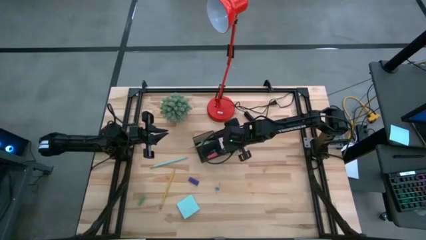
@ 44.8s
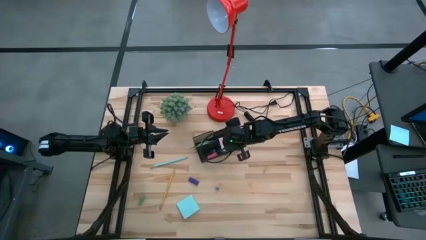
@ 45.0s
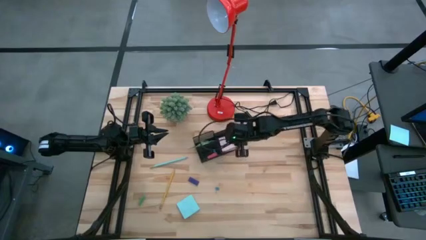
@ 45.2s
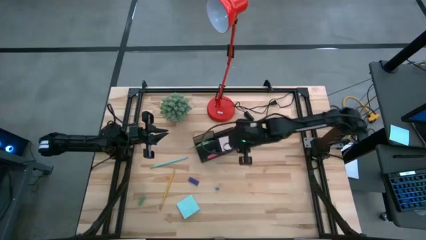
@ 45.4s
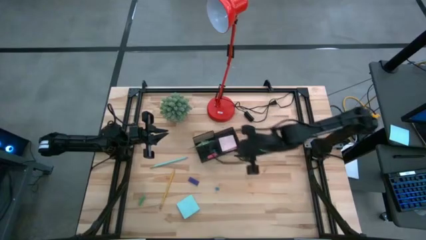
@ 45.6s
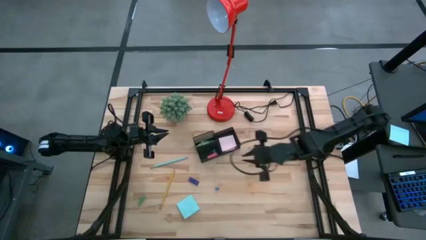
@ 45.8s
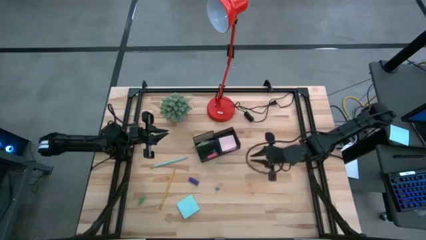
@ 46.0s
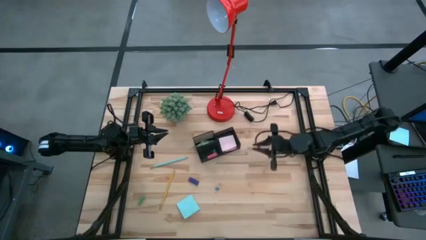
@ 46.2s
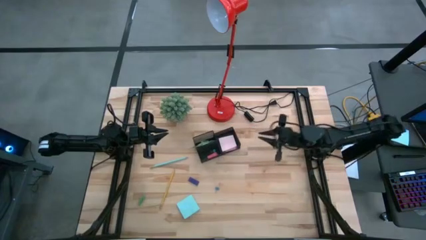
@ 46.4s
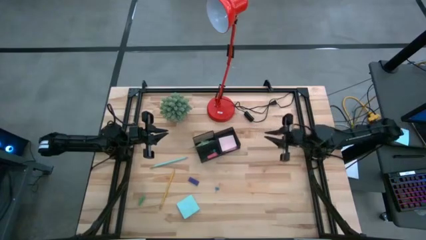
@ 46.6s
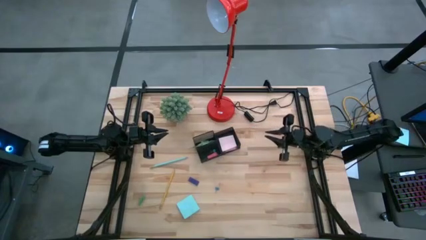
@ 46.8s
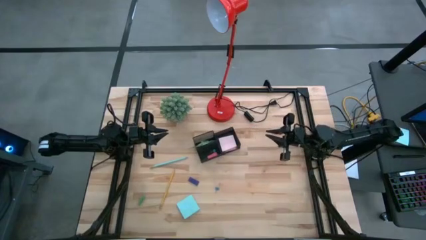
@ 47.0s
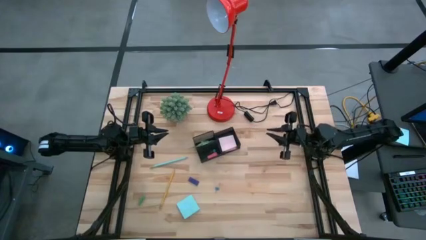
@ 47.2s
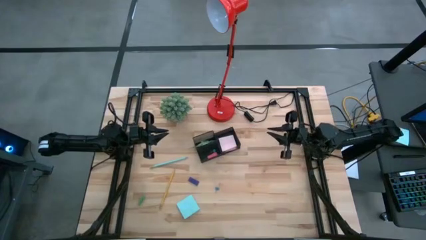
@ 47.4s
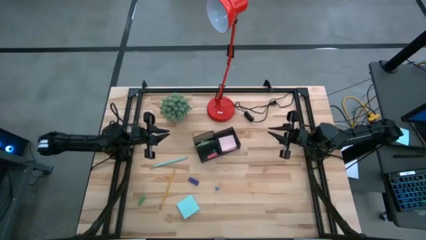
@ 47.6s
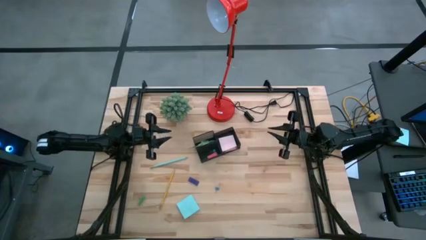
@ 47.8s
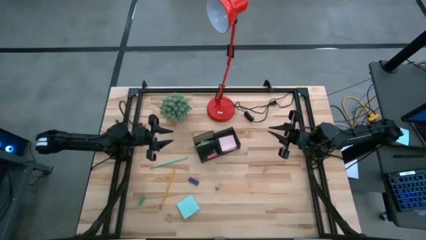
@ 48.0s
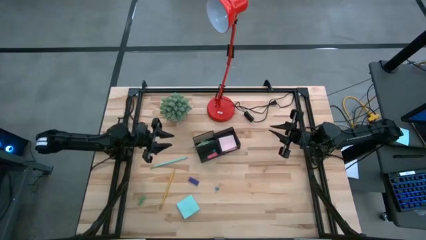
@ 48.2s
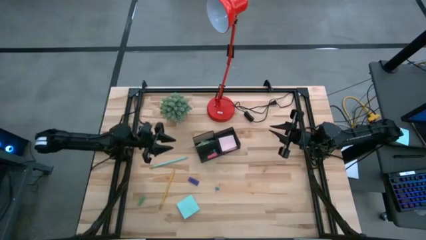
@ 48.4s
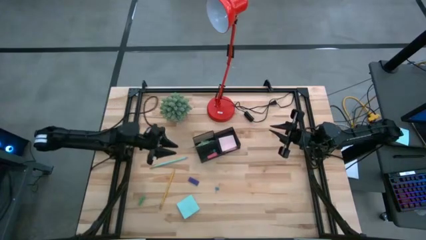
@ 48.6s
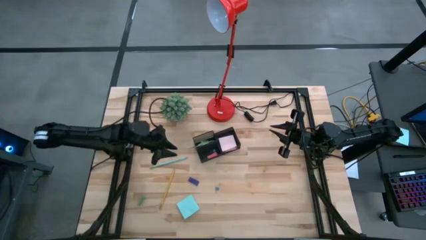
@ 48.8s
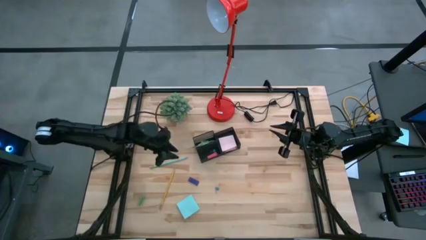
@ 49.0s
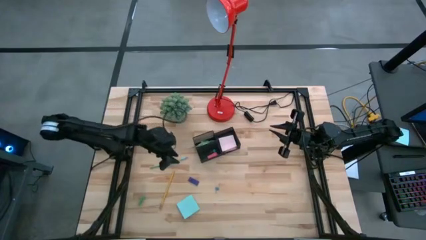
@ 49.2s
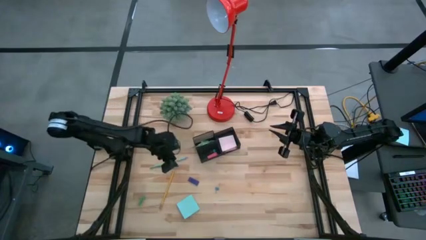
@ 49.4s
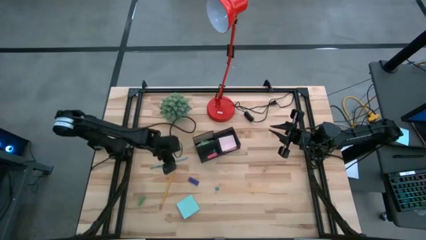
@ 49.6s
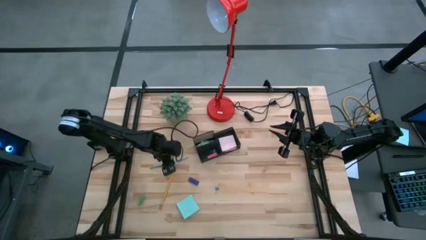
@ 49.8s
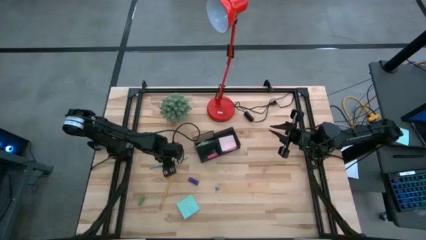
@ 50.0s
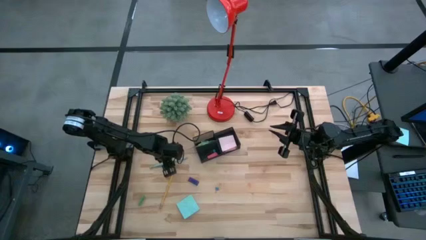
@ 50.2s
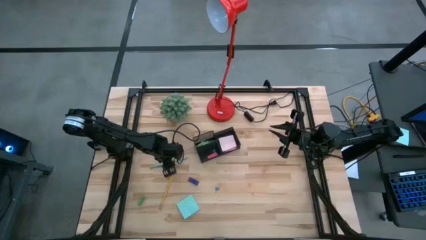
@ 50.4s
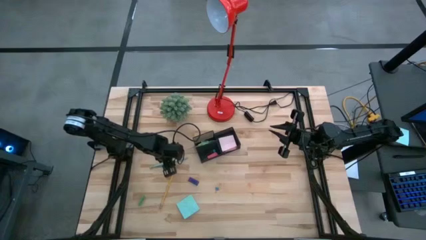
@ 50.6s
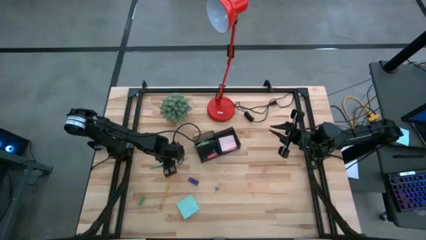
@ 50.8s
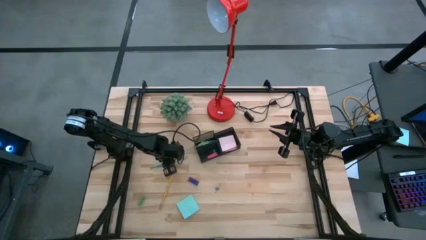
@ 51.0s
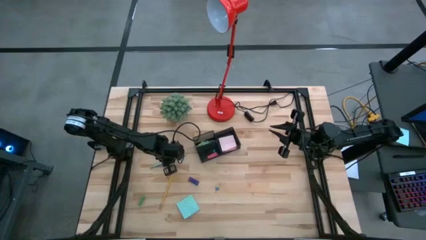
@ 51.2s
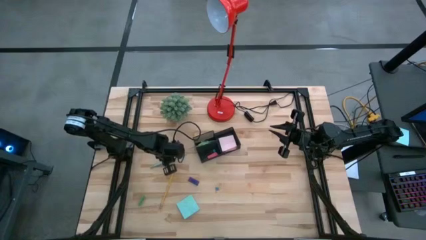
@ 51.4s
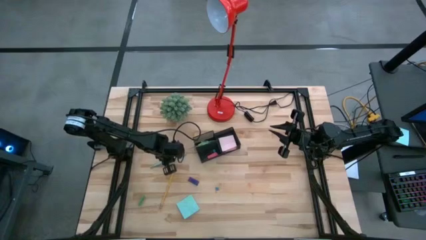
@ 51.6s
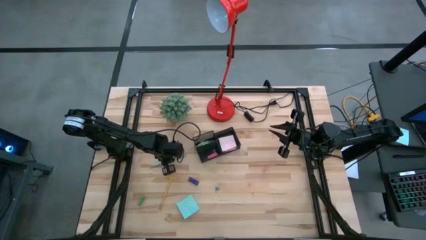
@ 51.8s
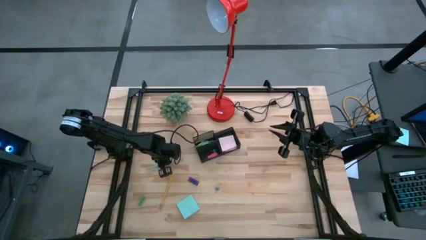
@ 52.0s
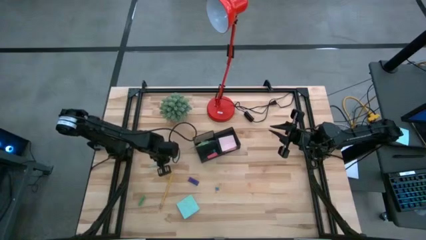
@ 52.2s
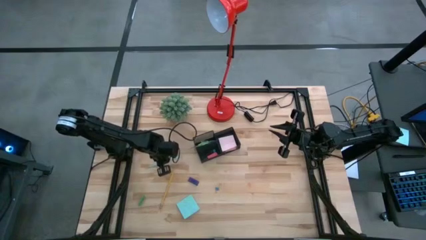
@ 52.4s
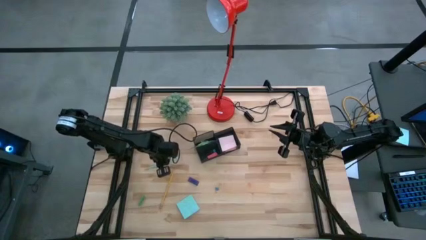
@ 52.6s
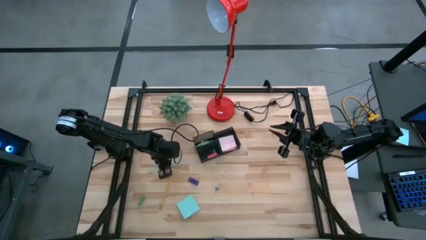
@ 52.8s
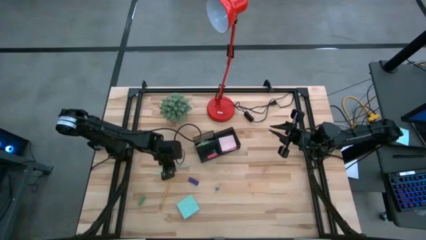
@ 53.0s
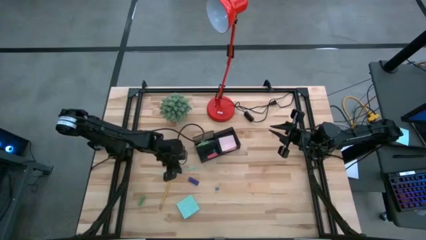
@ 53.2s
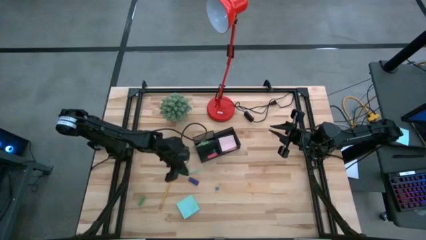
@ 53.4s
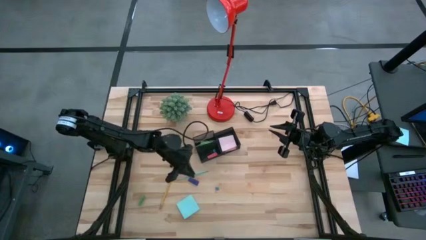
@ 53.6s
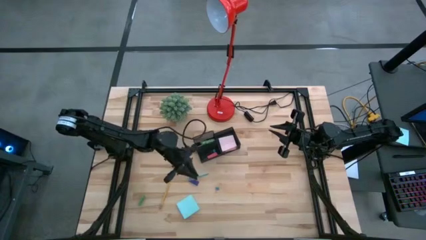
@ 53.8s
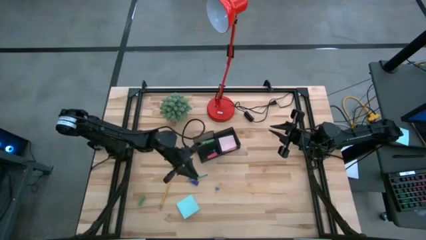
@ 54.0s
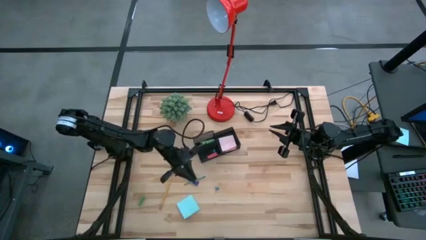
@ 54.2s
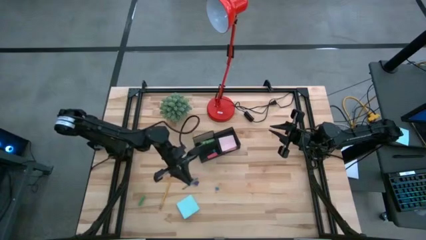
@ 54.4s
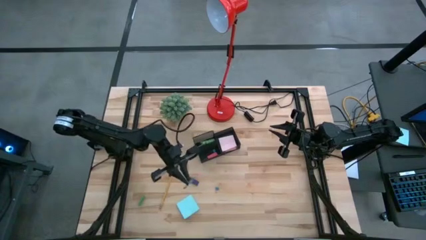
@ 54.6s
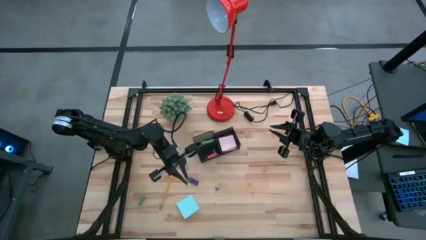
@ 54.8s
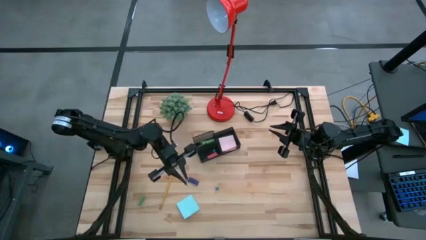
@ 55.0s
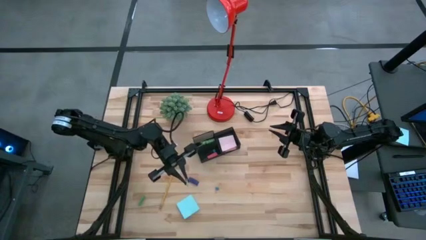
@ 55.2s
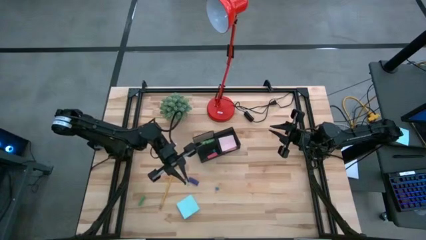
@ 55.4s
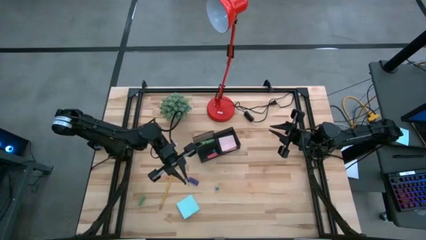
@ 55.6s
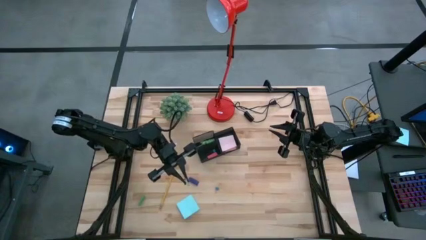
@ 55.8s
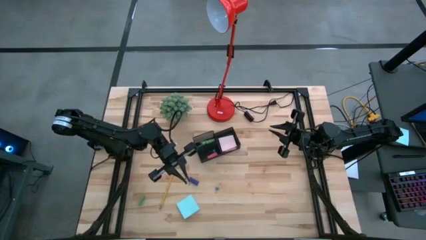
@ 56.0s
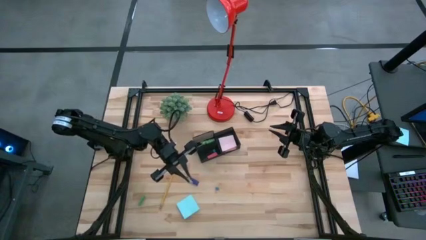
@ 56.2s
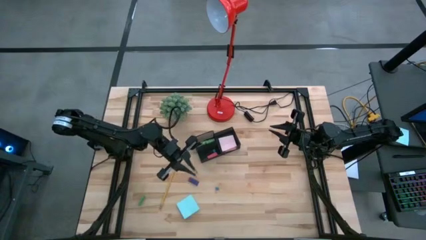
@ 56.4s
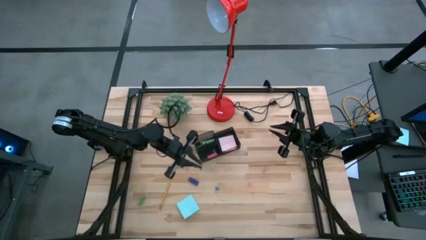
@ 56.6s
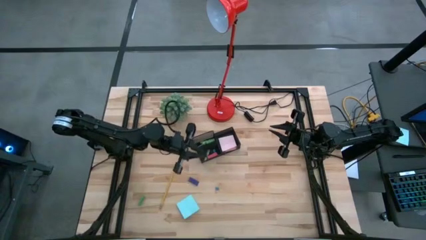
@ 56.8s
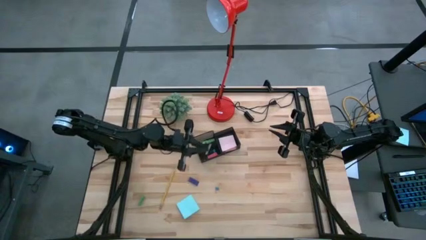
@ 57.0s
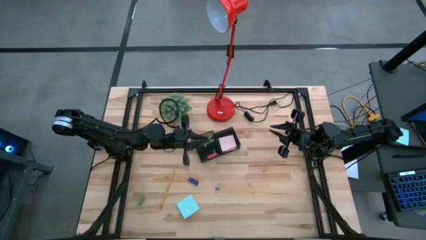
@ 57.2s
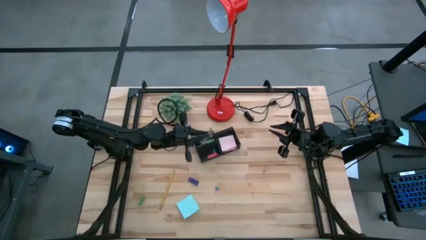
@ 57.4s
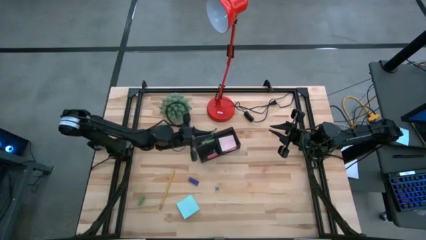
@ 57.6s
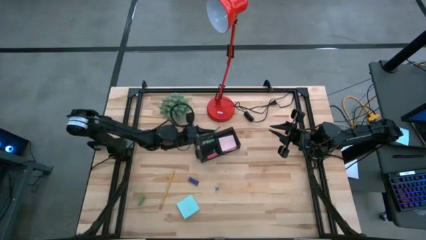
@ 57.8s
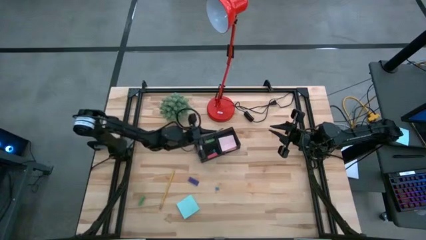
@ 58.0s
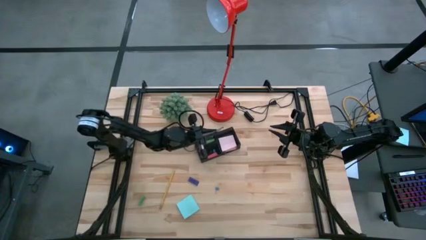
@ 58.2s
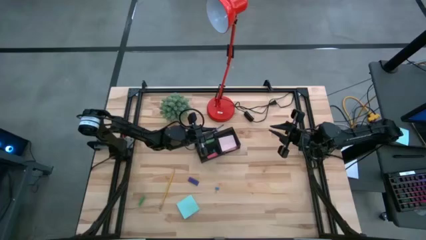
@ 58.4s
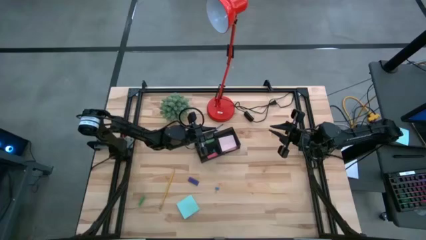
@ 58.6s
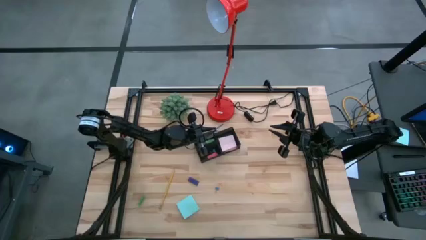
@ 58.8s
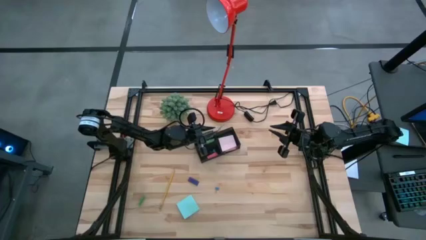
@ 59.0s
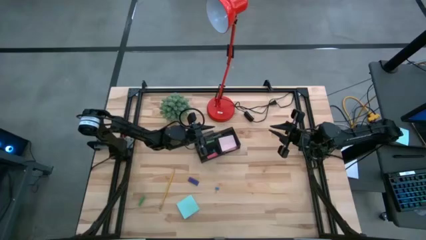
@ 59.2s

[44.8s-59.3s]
Task: Pick and place office supplies into organizer
Put the light blue pencil into the black desk organizer
